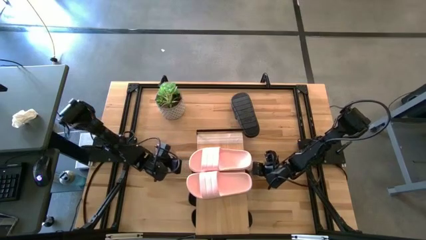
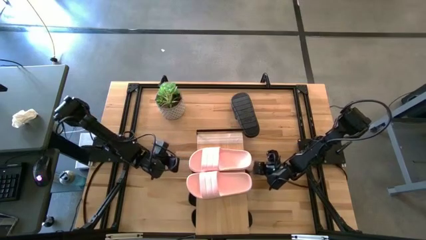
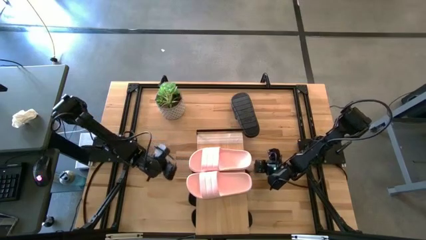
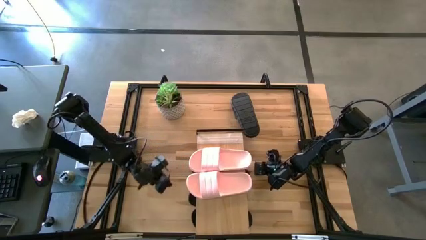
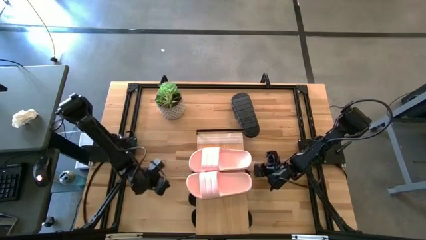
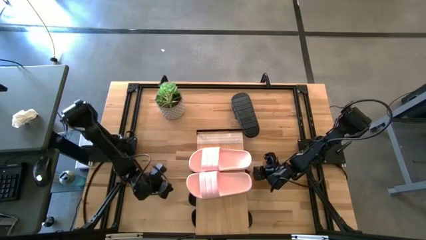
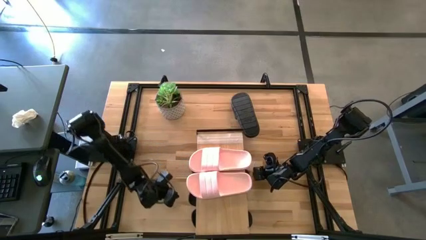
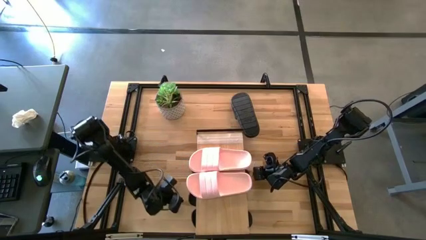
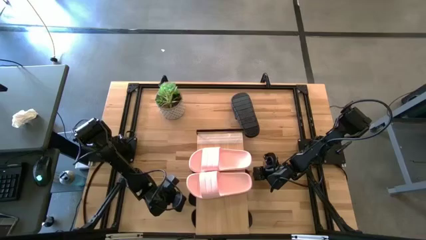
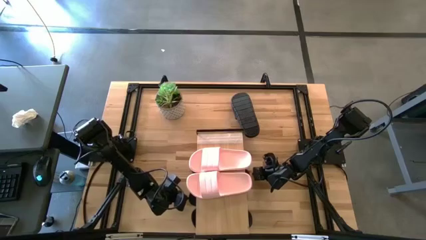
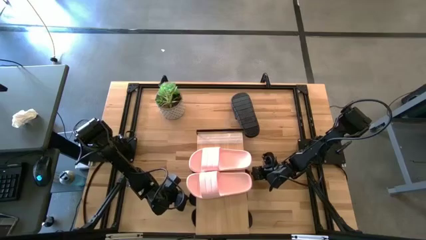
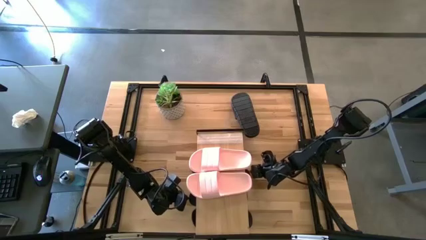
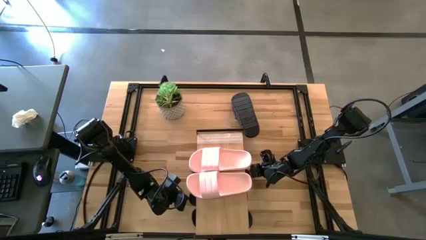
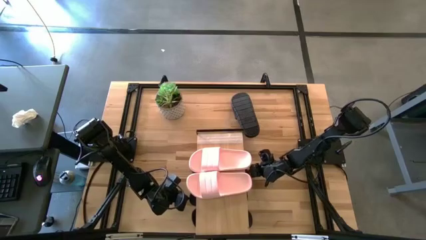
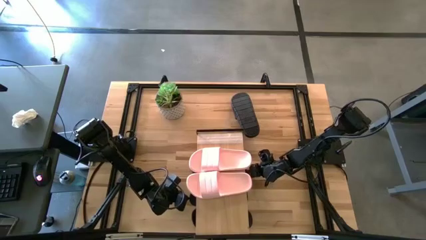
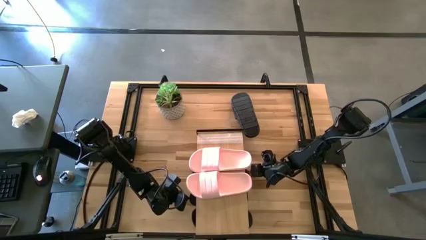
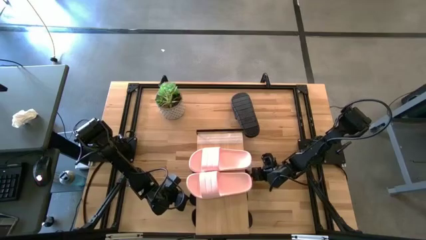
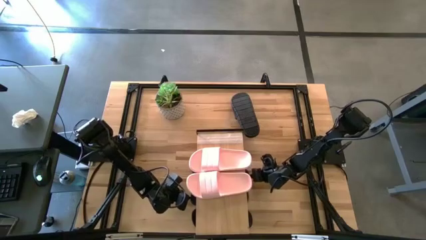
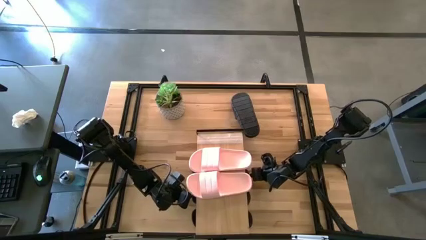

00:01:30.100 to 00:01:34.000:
Task: Pick and place slides into the shelf
Adjust the black slipper under the shelf

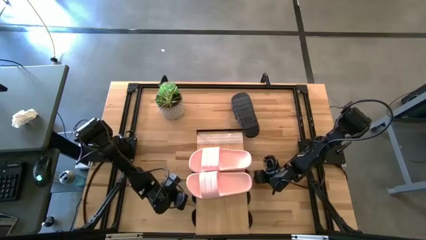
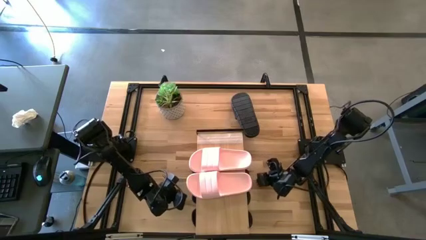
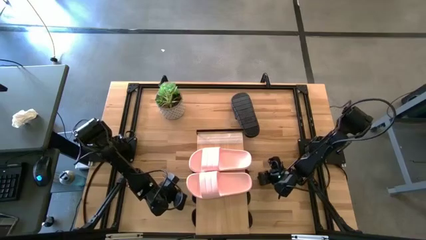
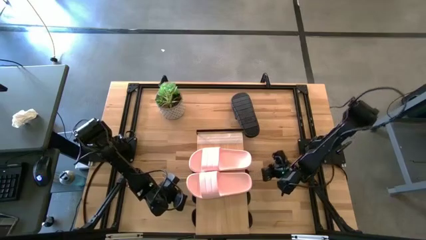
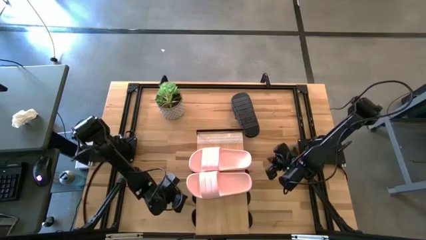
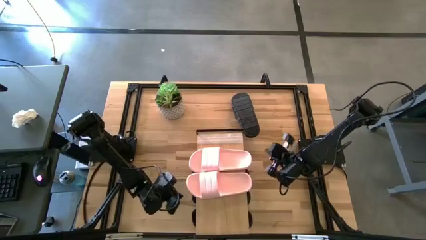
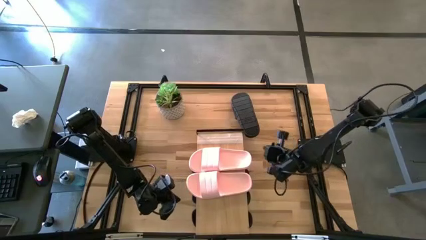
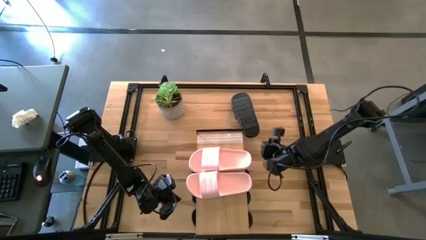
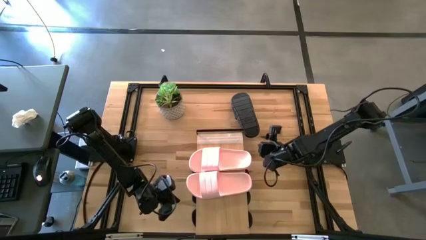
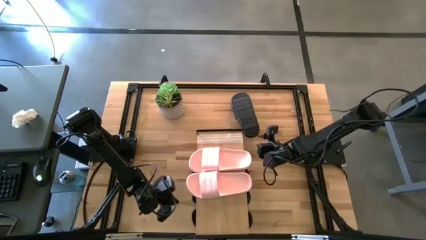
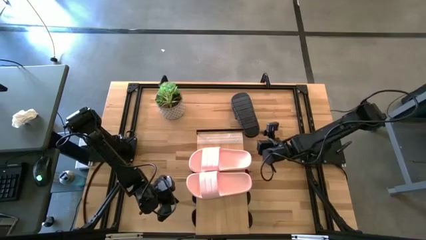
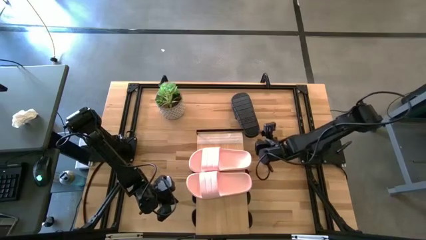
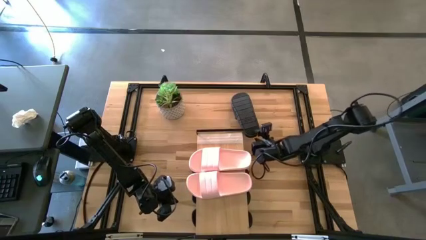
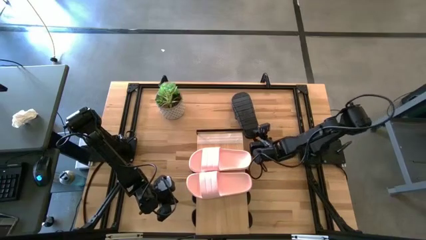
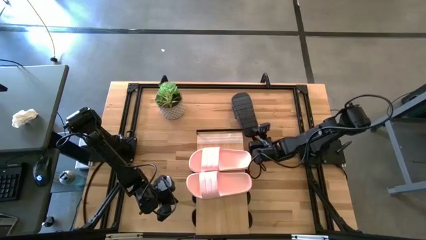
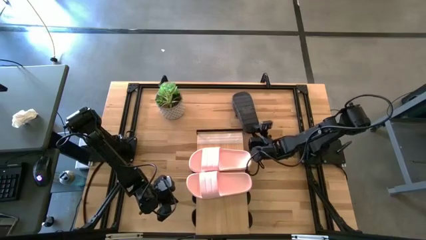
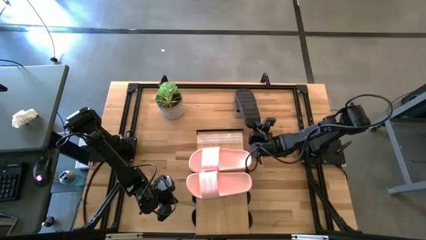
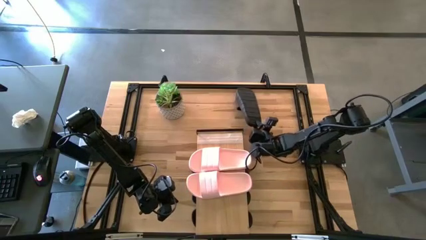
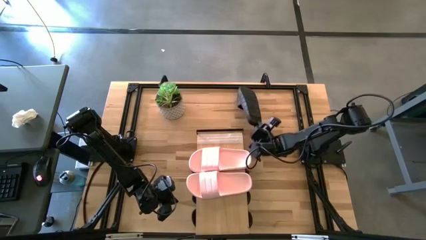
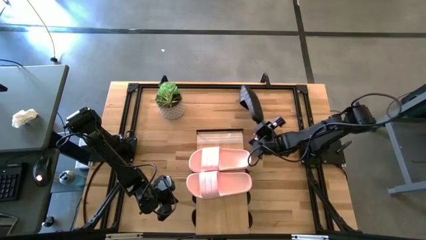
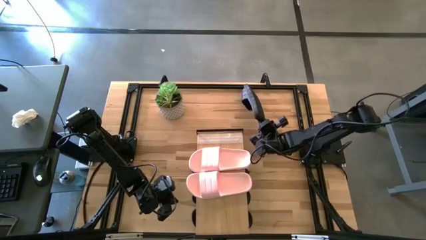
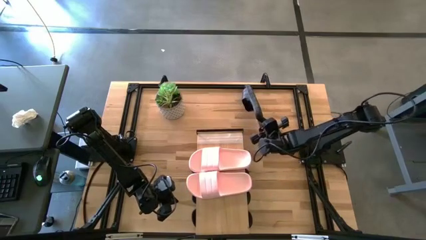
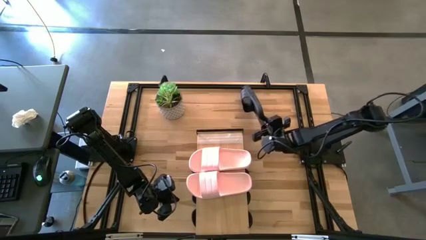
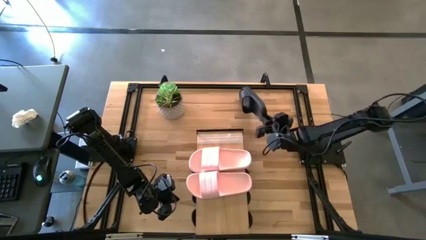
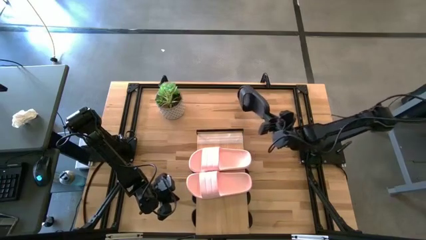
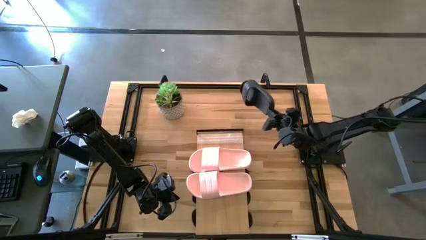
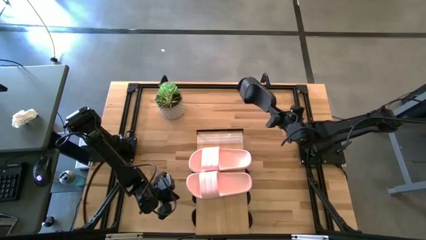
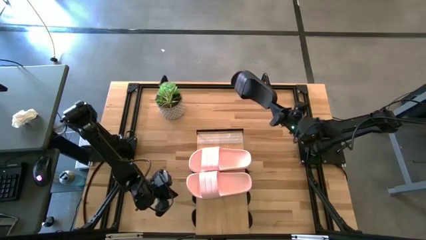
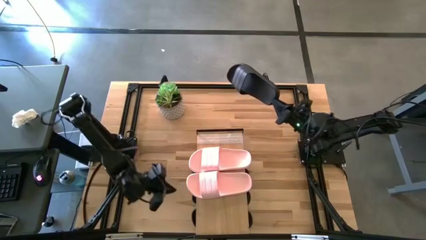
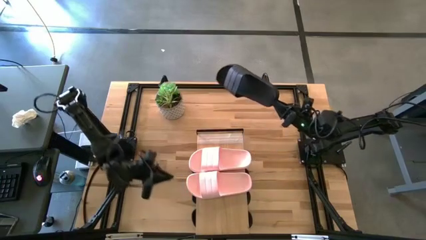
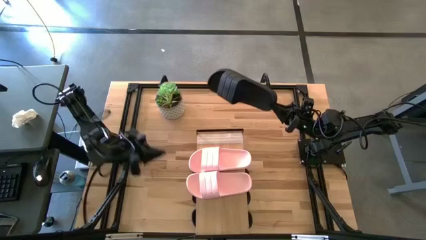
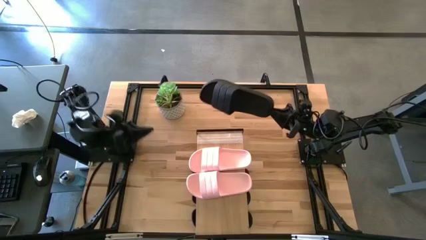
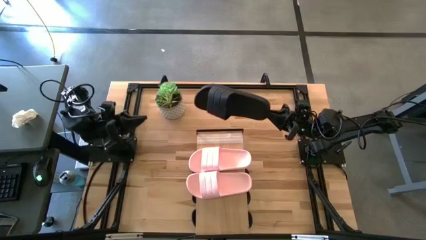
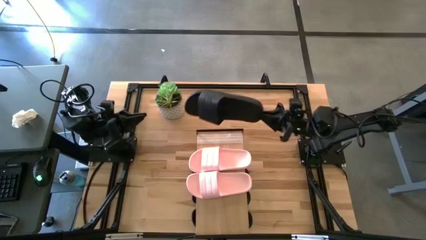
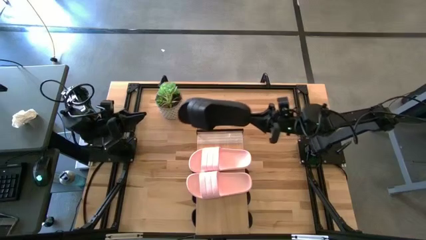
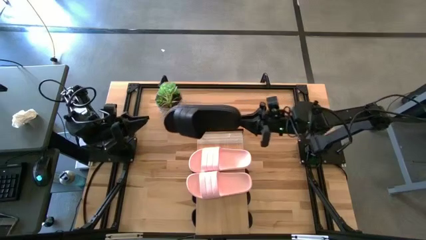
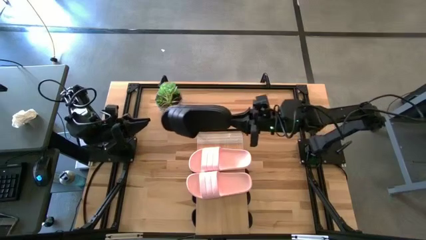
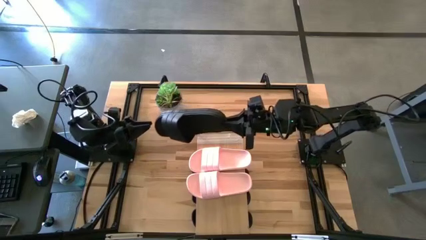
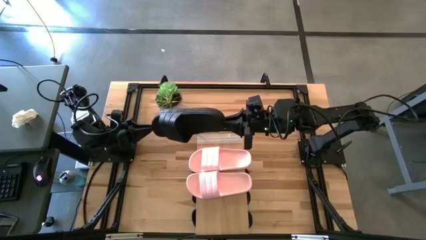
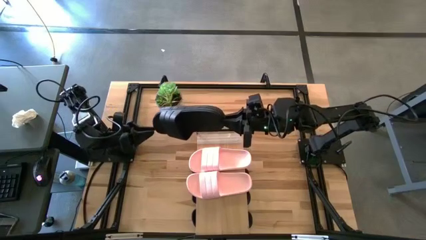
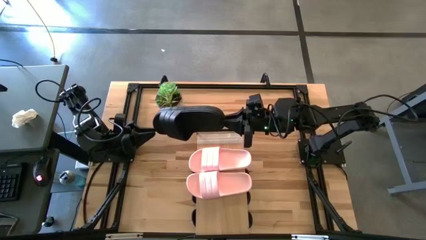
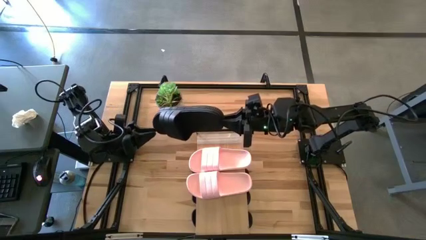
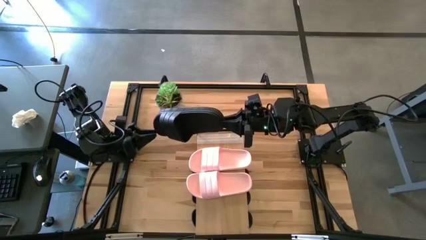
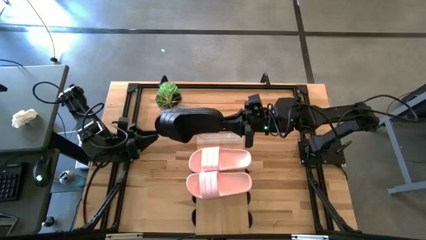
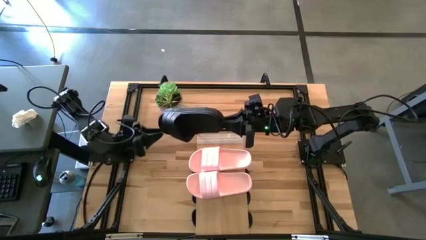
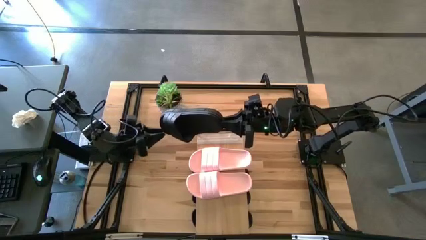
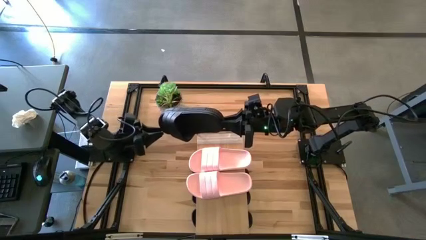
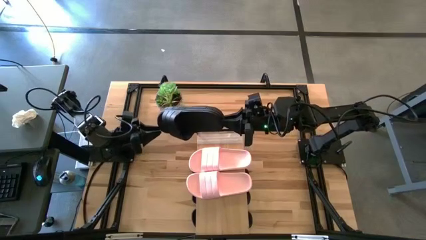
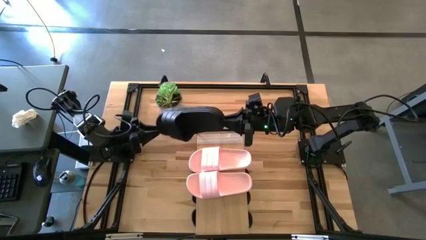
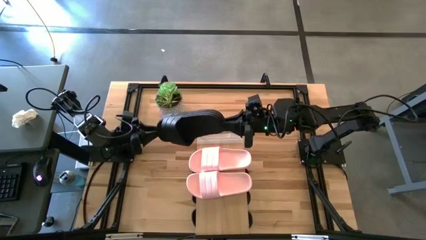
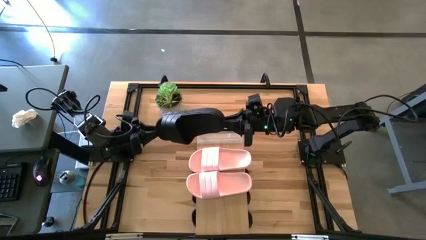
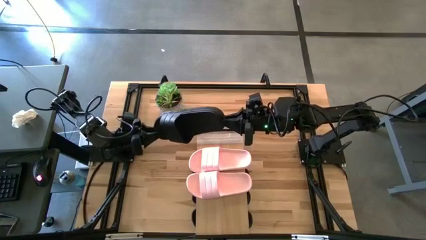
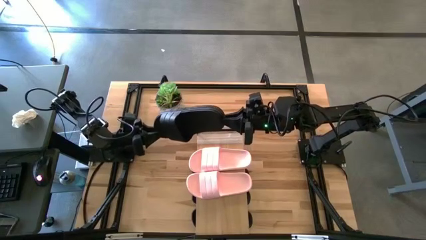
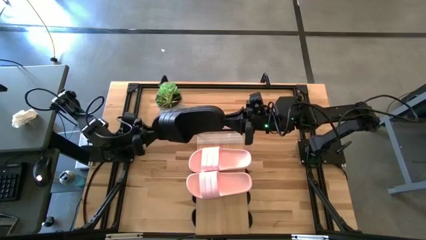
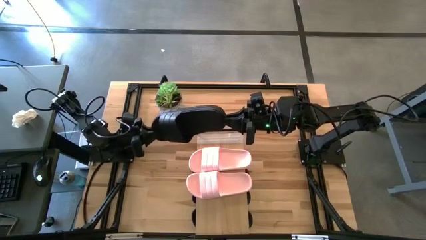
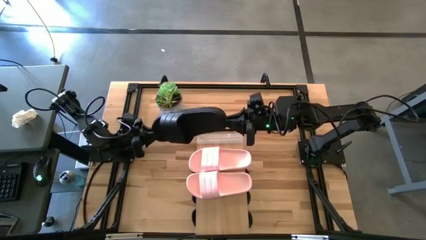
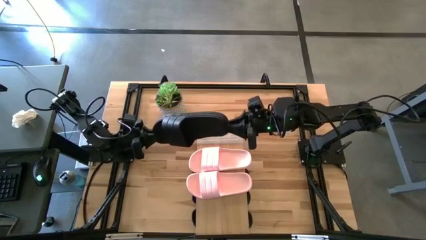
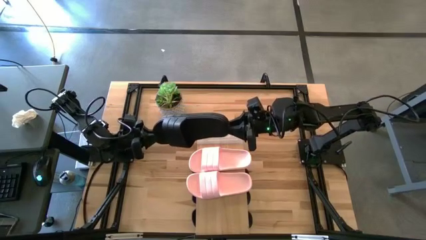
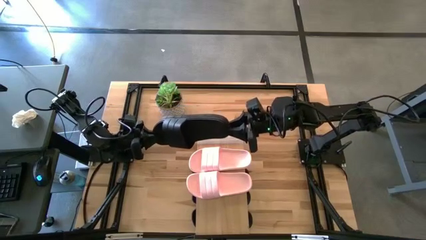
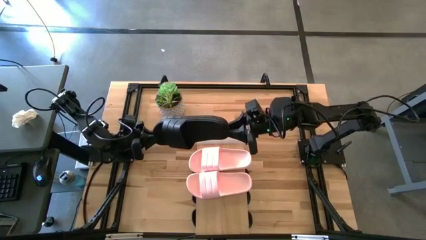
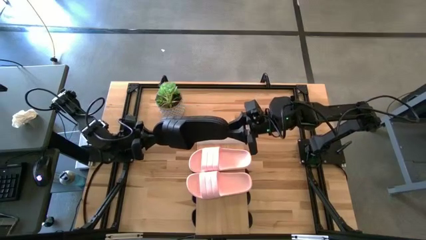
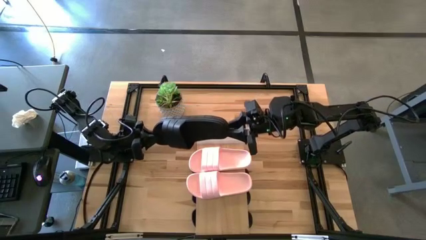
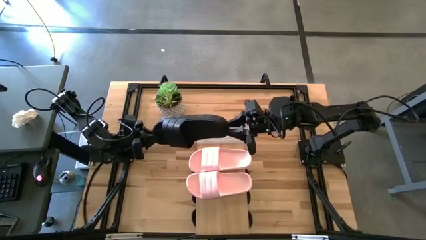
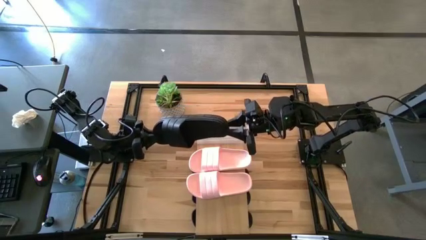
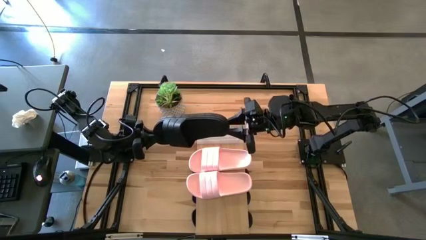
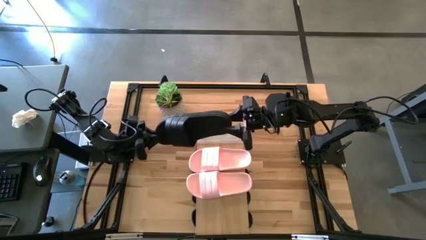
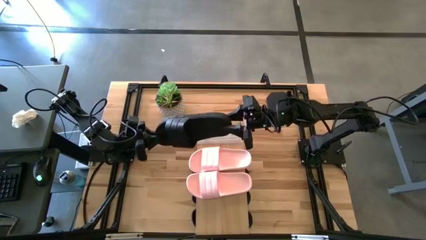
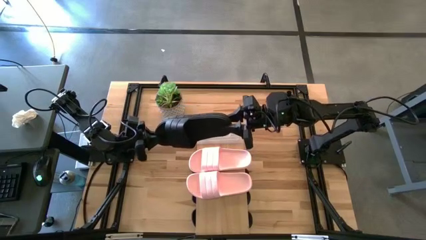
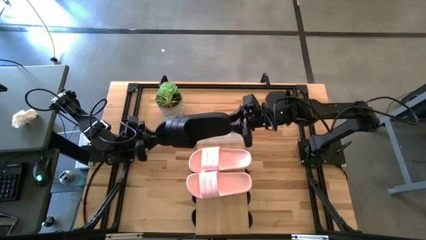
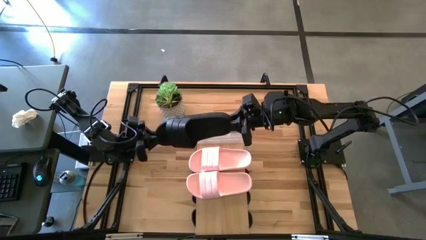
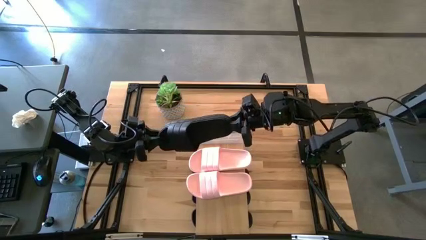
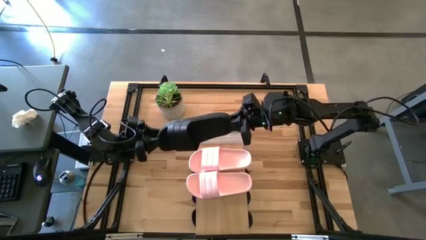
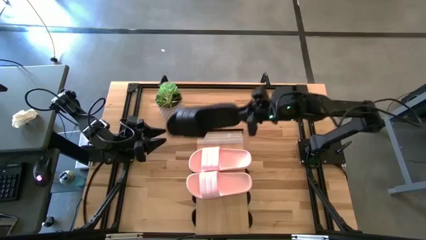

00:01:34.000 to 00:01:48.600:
Put the black slipper under the shelf
